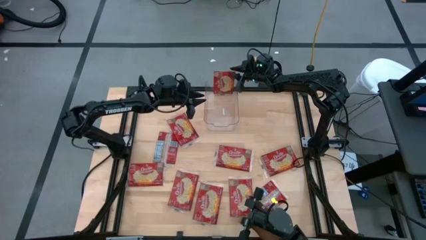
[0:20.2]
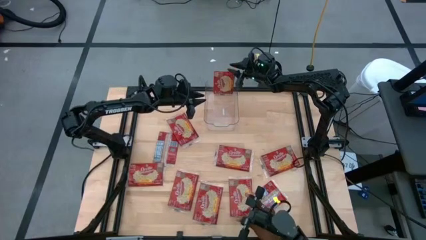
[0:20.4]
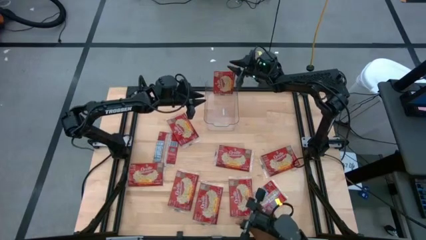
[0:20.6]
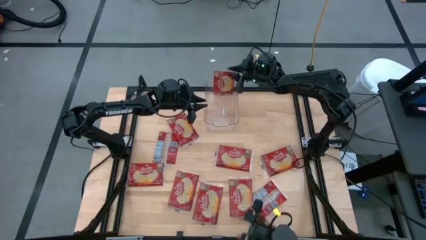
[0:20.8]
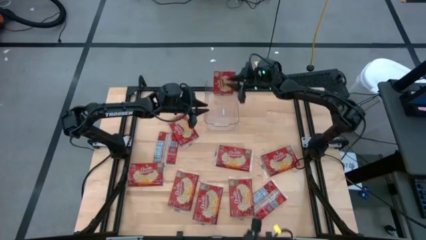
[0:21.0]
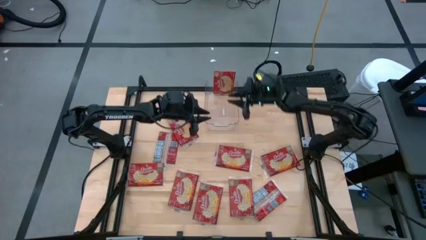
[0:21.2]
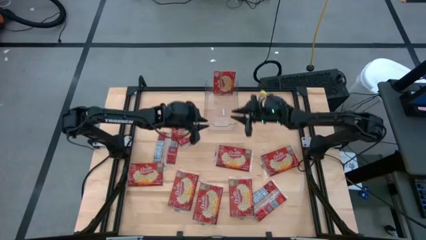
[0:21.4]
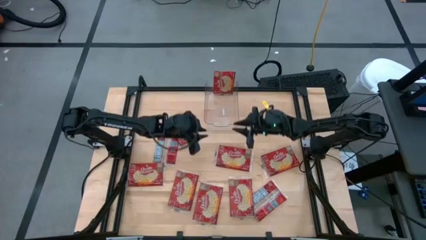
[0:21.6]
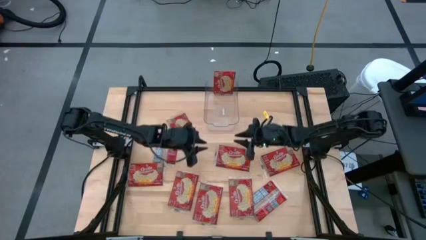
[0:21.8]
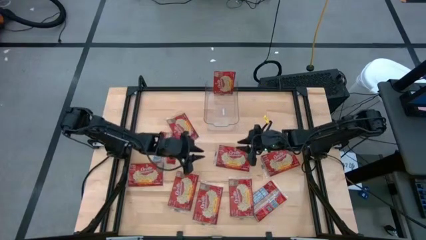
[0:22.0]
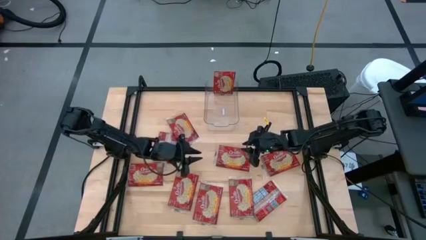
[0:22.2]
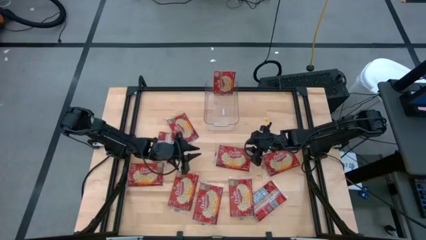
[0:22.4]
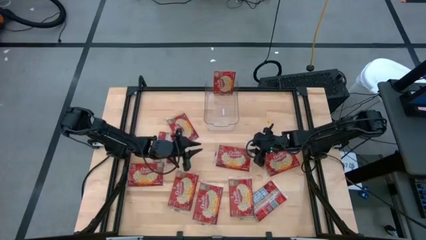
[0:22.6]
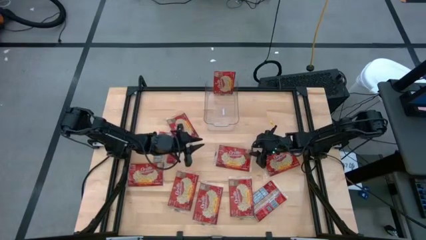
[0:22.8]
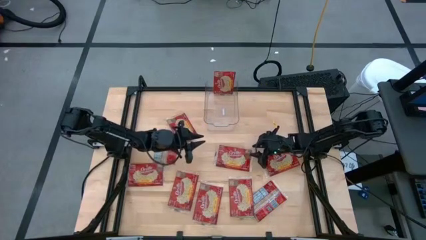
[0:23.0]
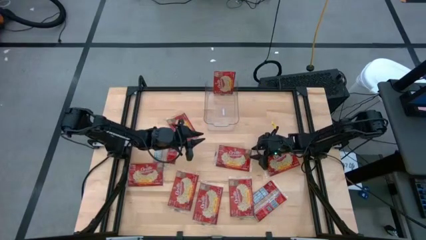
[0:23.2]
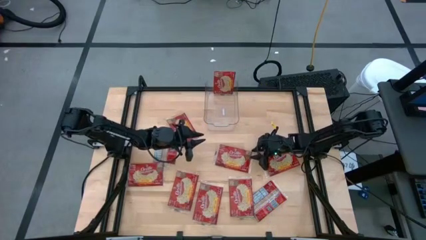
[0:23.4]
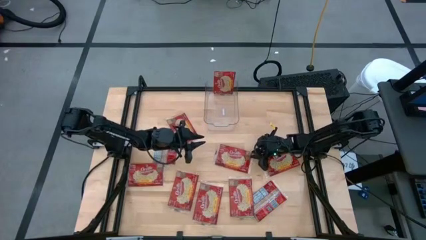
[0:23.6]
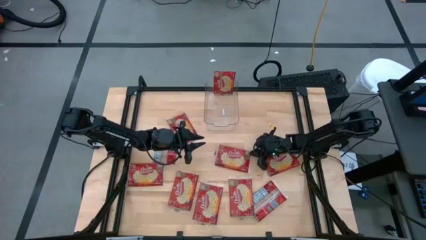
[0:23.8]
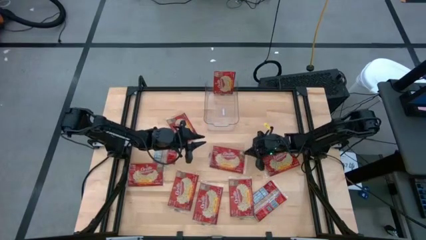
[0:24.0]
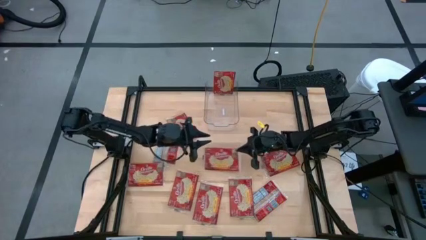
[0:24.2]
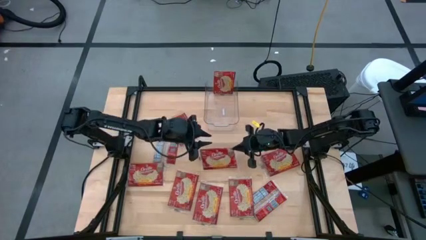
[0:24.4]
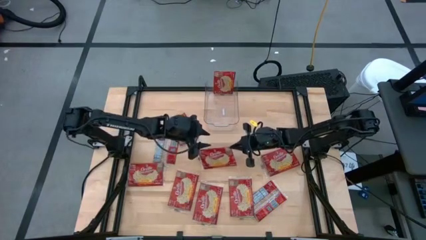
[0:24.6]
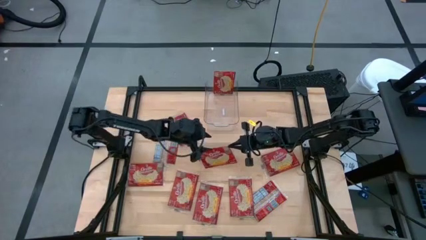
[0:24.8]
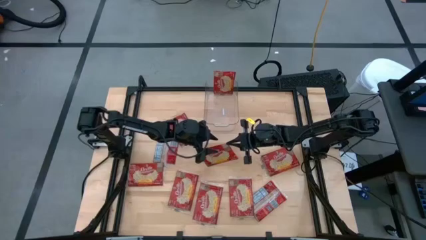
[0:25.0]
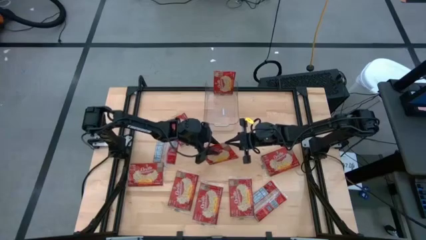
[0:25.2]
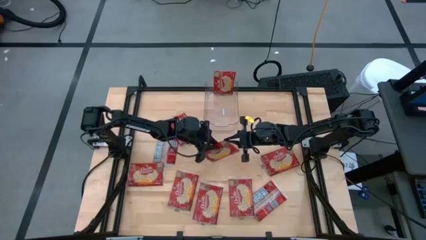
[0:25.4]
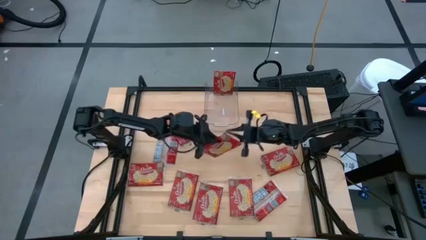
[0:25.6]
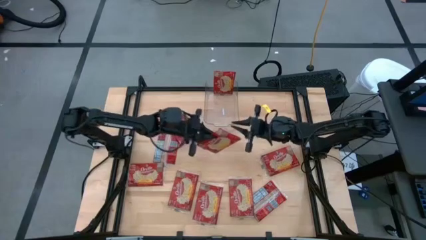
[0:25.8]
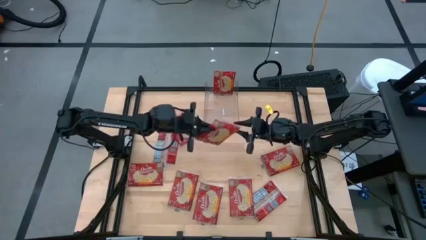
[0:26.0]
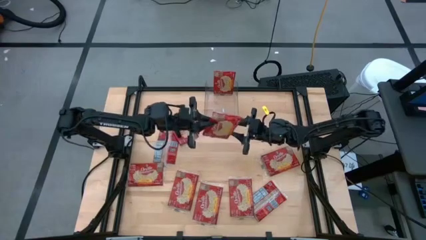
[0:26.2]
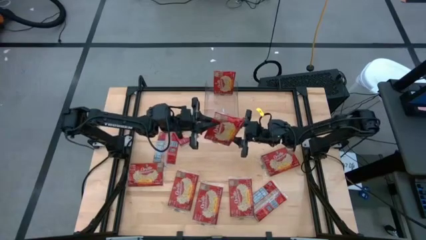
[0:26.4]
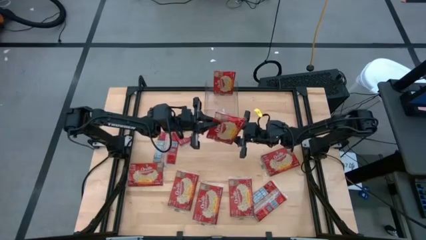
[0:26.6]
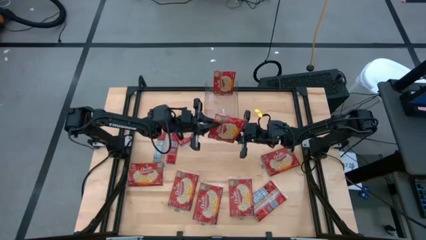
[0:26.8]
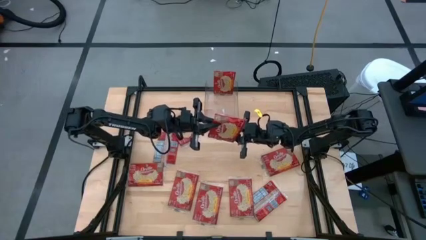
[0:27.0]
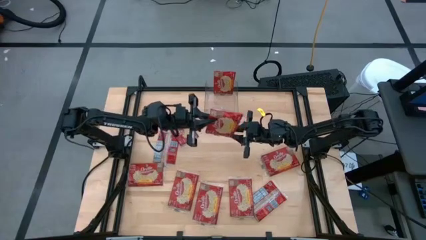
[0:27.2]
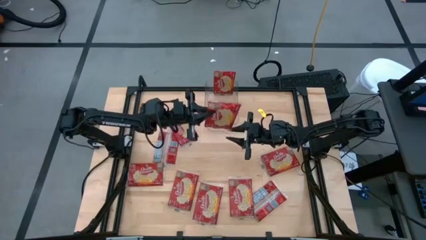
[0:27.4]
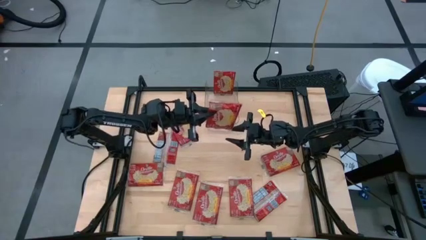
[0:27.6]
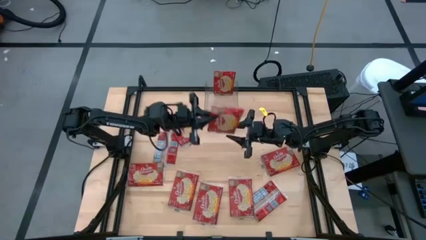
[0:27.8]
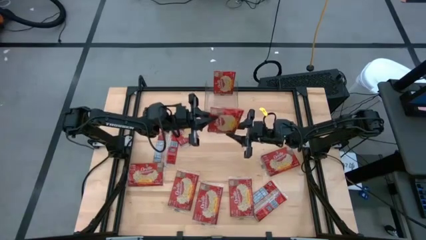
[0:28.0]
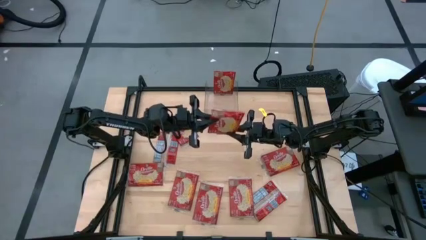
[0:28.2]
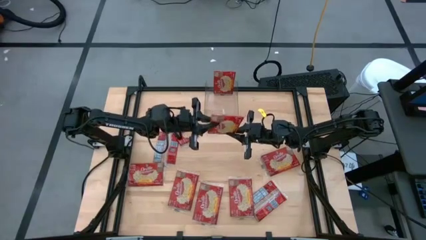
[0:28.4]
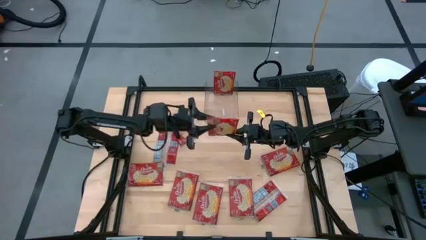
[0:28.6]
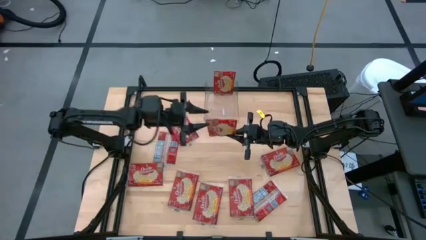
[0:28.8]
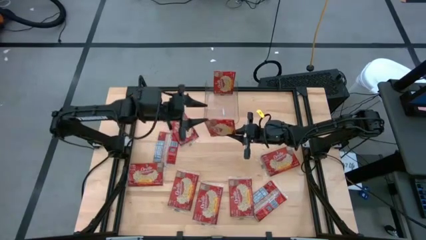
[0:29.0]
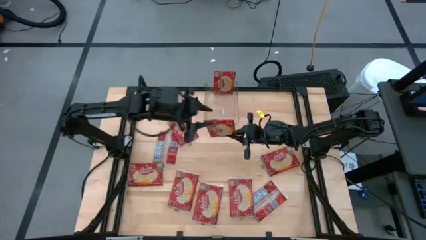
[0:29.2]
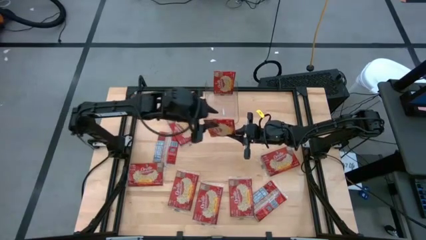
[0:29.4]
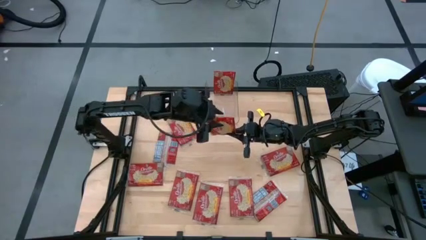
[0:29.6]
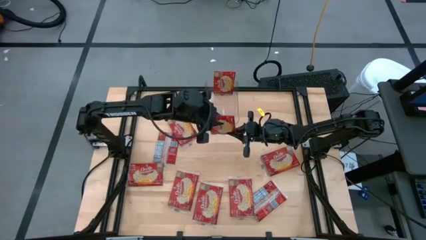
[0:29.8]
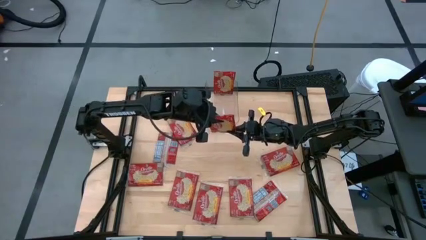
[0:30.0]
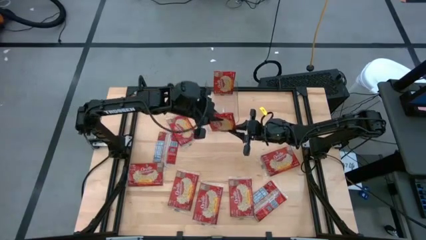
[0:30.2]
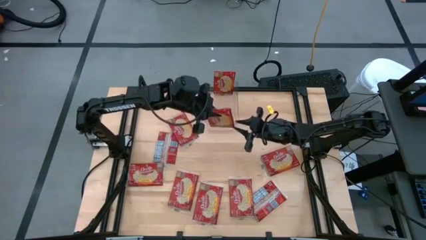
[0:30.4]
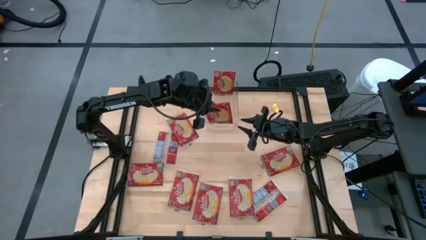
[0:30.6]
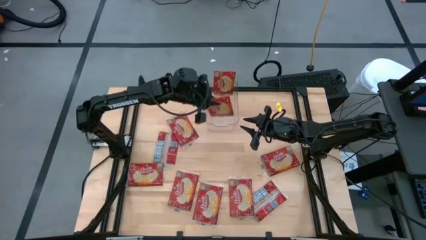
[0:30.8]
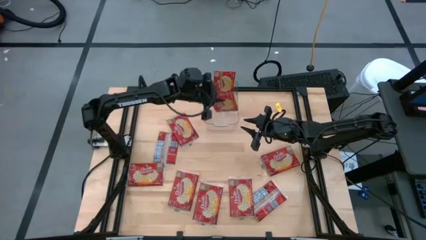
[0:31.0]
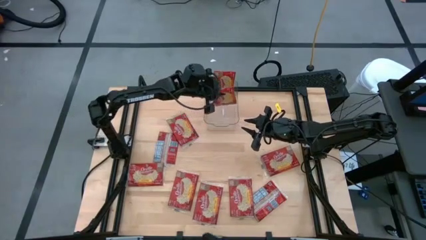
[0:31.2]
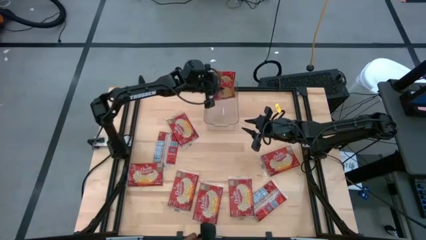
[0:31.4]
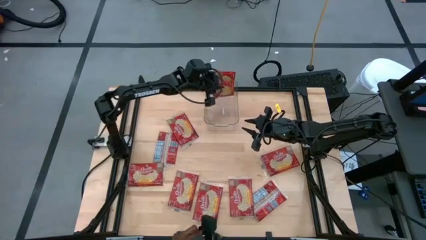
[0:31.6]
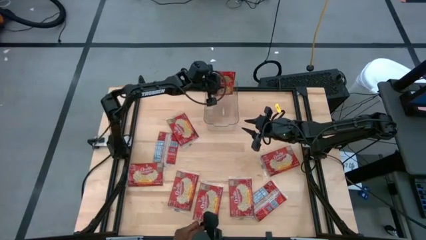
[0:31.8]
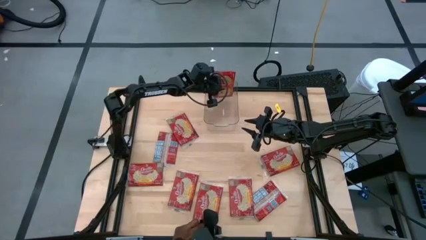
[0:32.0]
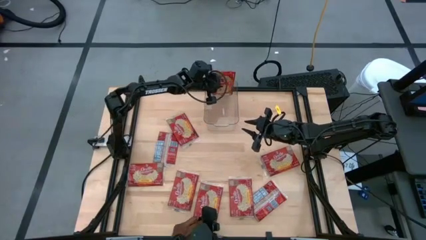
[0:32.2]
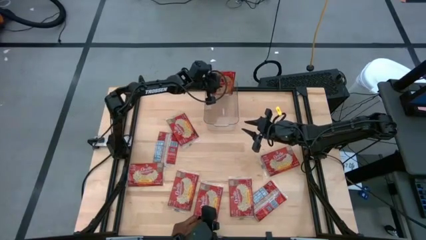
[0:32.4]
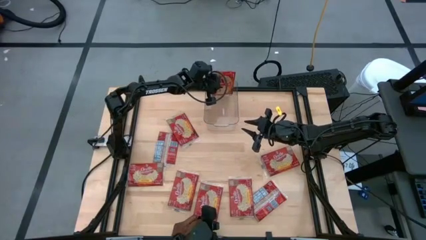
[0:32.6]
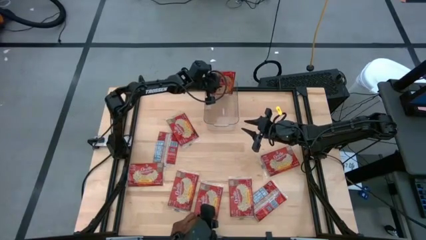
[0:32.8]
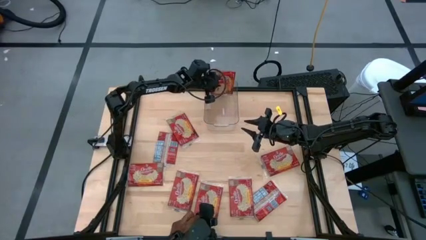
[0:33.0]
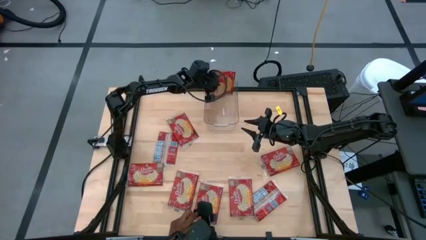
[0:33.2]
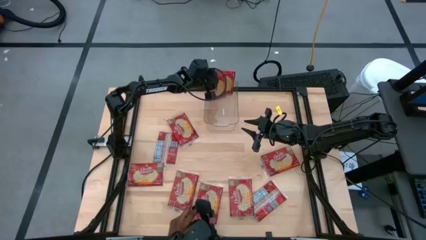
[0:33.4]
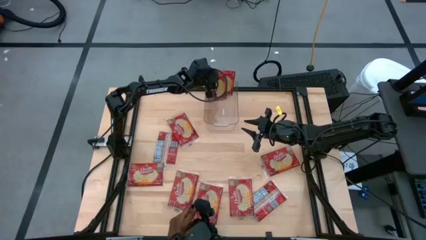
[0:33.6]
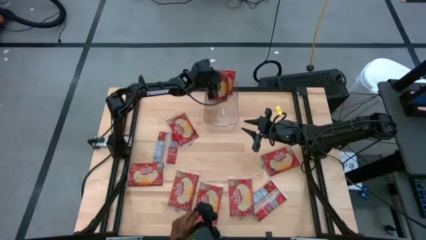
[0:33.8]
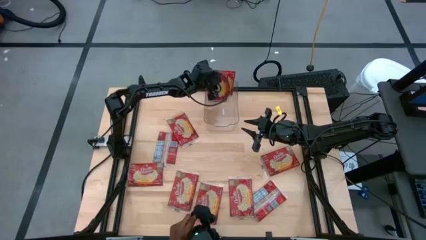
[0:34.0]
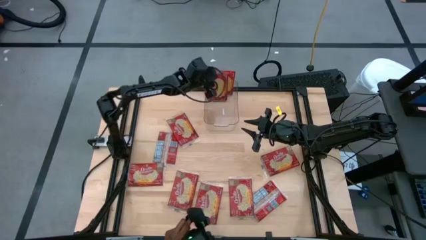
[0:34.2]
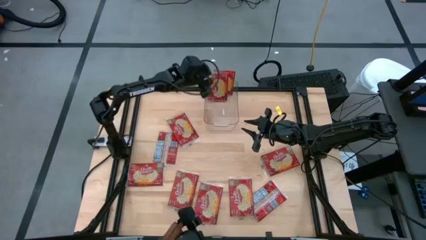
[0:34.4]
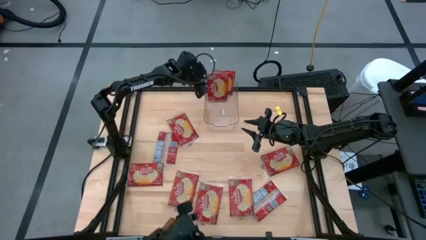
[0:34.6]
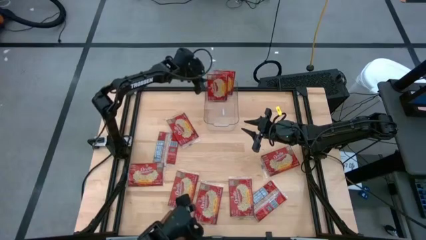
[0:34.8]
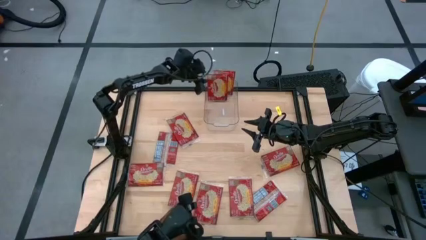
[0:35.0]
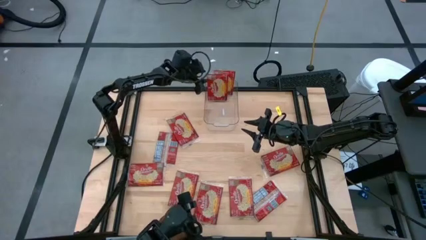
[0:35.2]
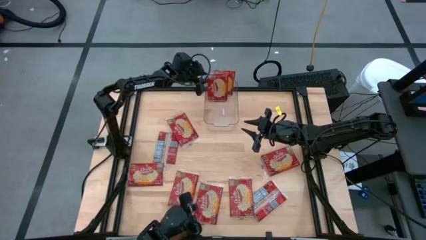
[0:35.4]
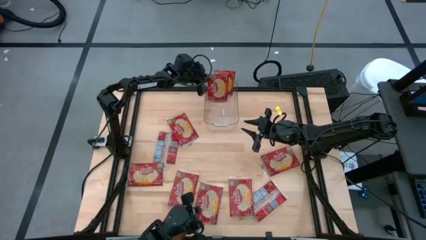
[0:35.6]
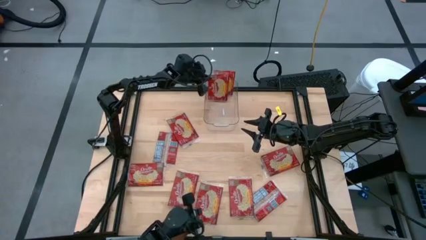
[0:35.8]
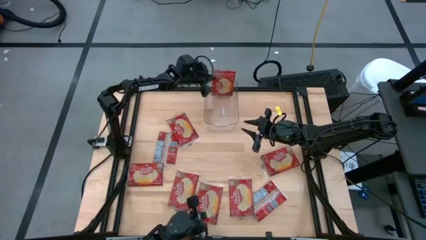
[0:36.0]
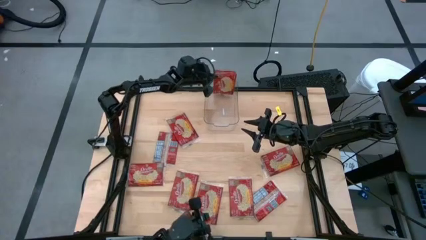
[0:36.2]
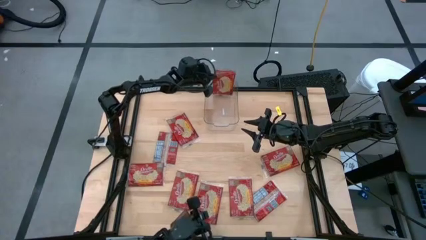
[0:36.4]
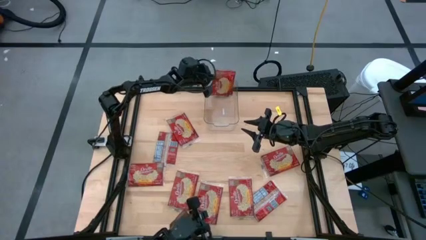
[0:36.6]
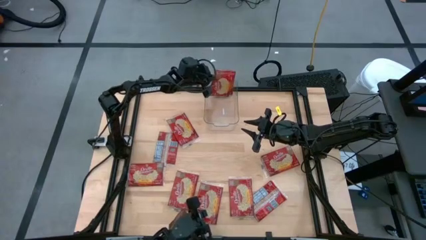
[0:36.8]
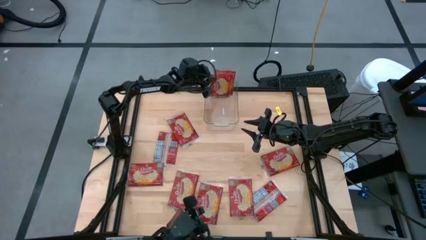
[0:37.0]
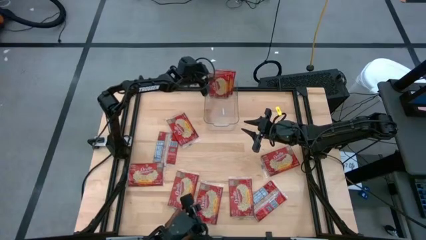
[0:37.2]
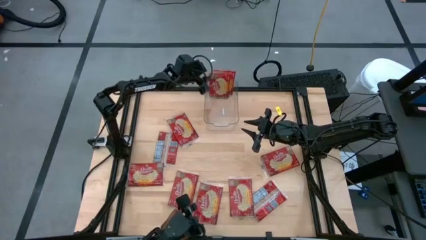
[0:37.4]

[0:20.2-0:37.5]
Task: Sort popcorn bags into baskets
Put the red popcorn pack into the transparent bin
